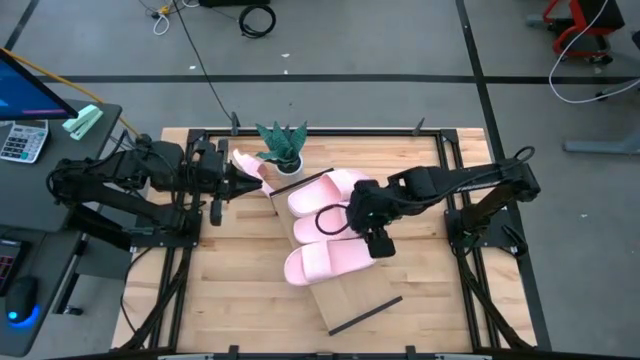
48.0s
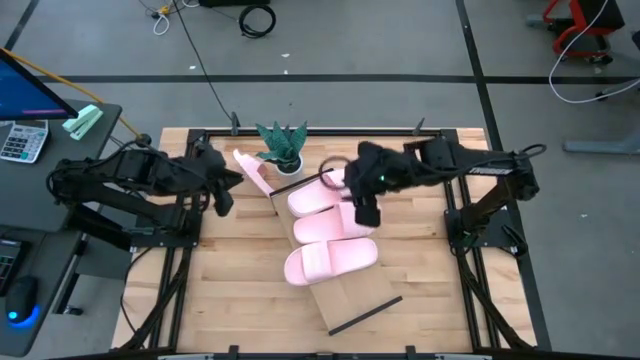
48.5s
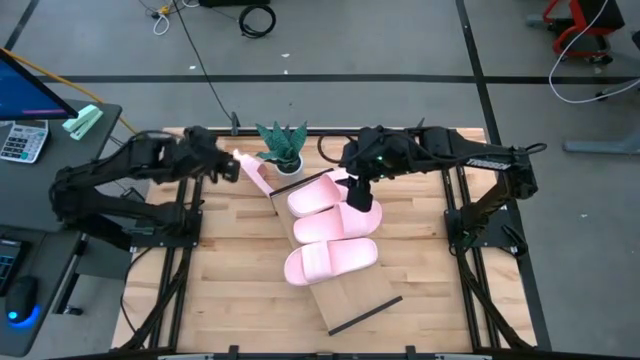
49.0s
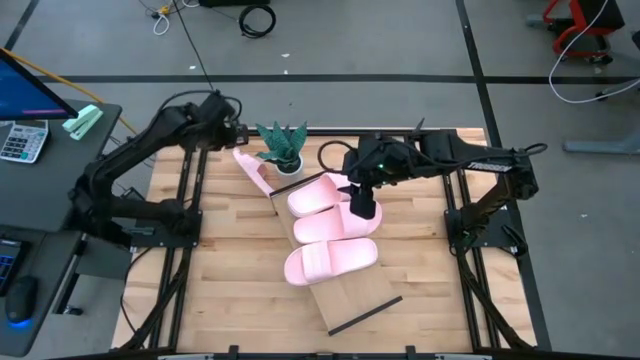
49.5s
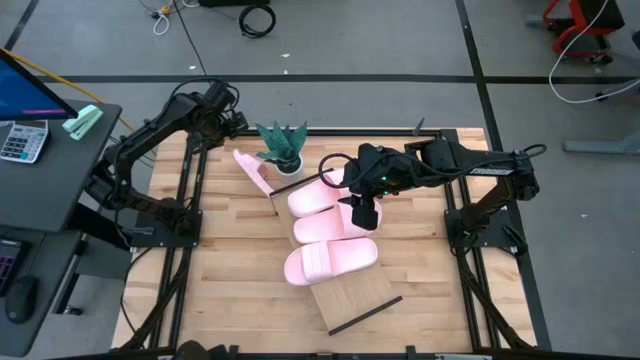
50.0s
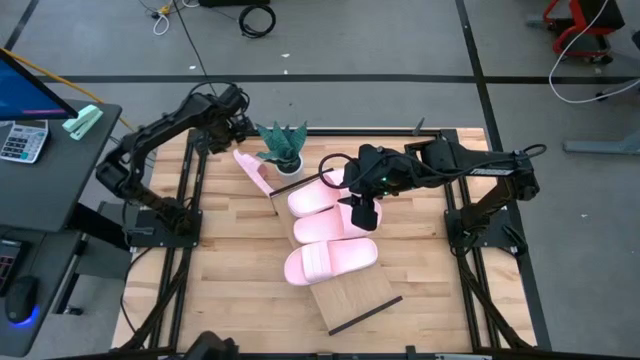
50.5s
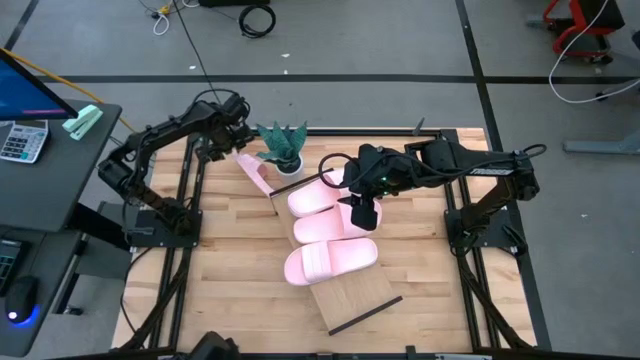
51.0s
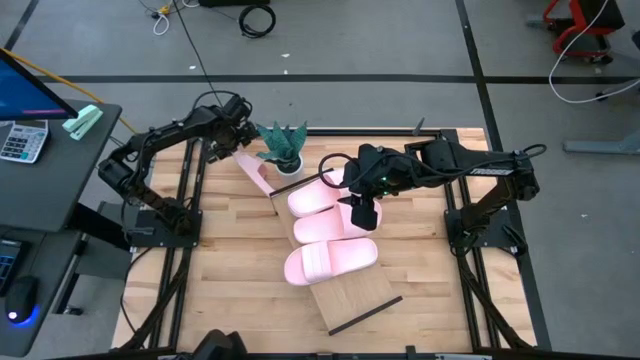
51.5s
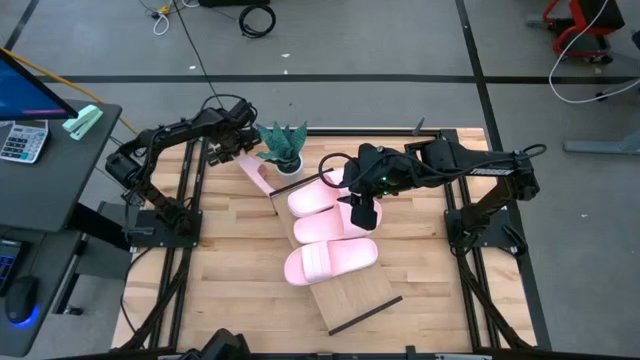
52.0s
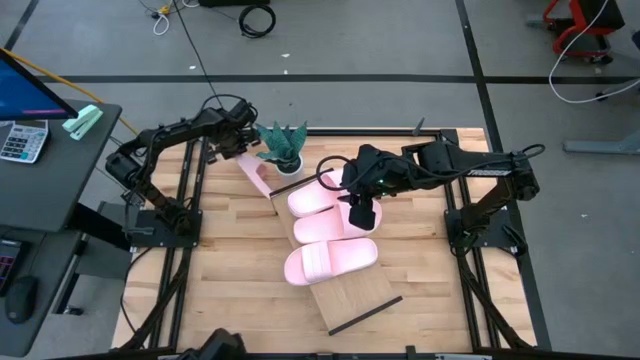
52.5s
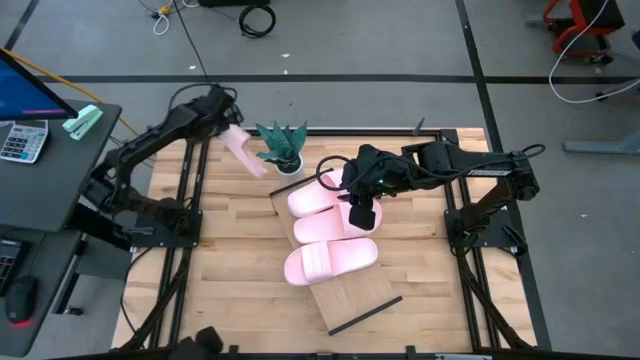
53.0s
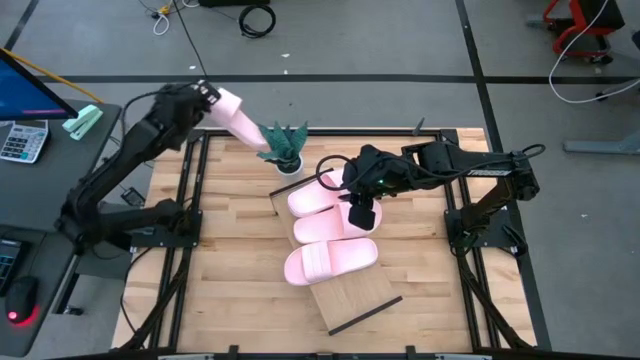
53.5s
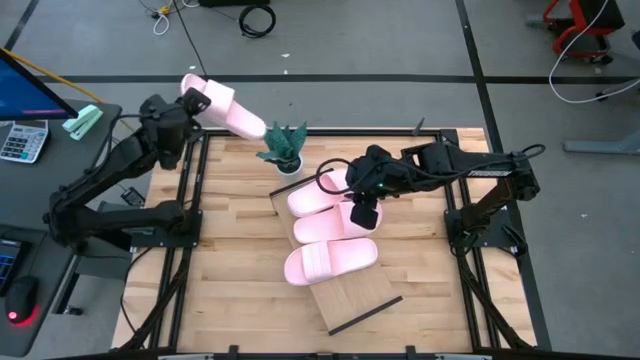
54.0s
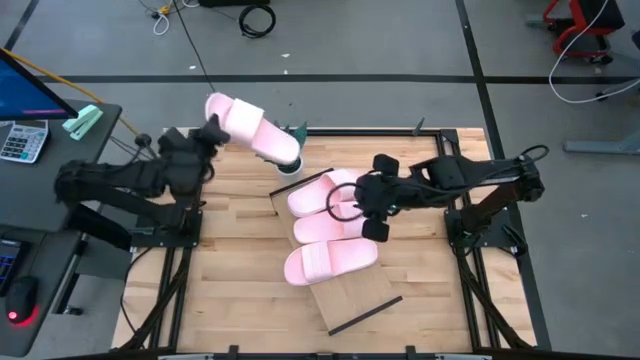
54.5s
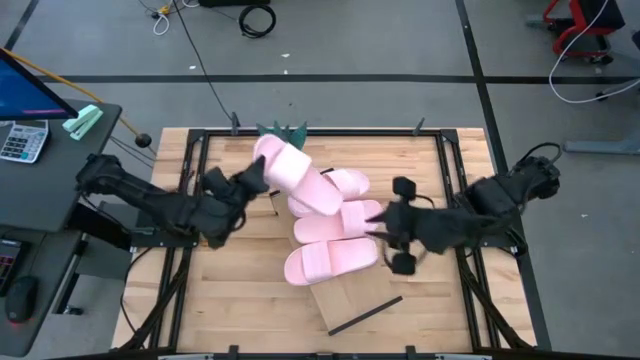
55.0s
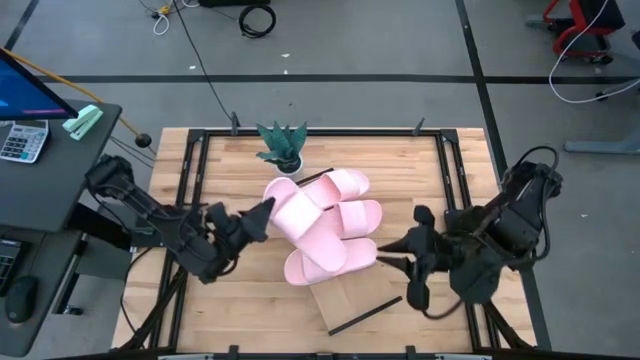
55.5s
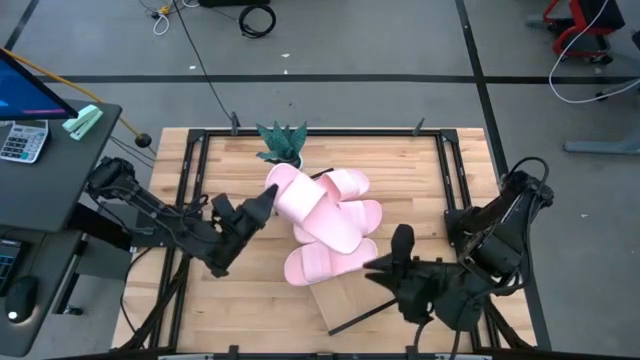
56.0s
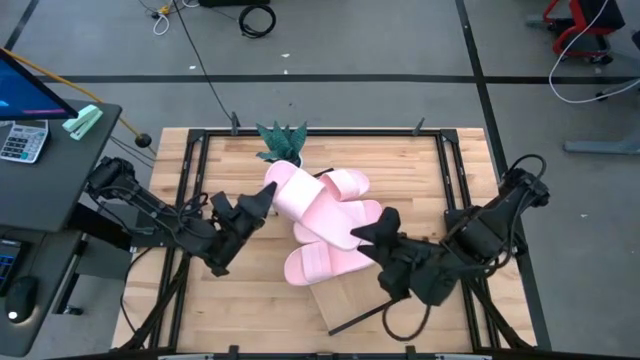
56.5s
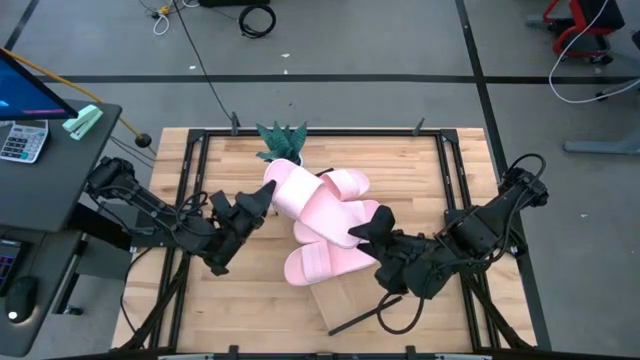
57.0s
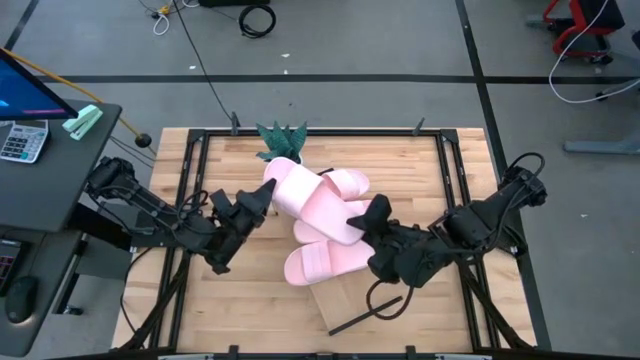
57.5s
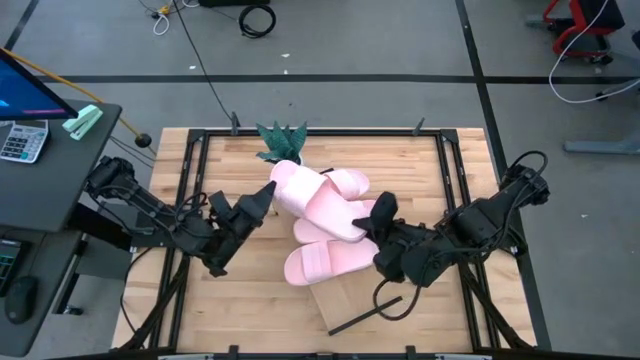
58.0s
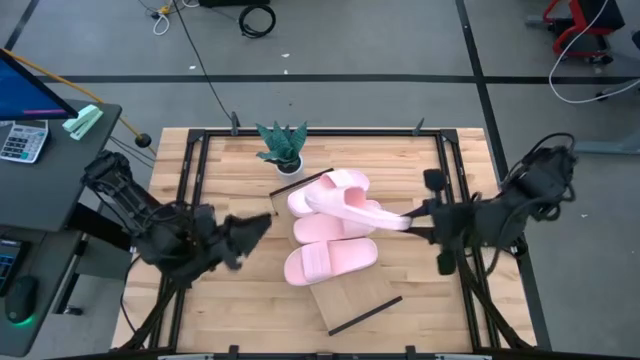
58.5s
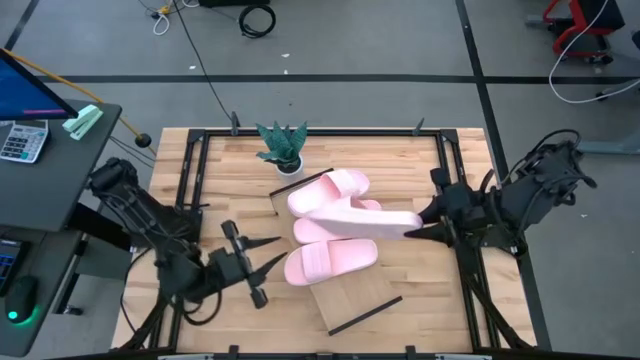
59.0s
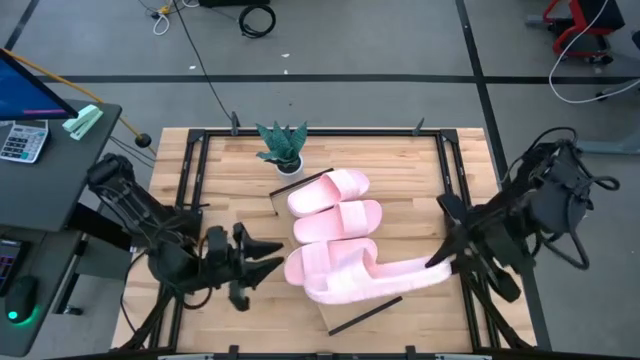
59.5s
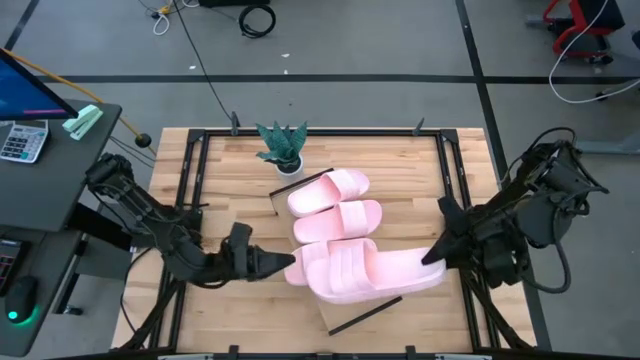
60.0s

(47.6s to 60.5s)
Task: Pick and place slides into the shelf
Put the pink slipper on the shelf

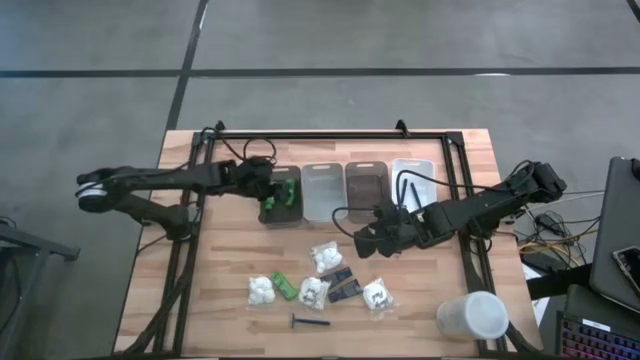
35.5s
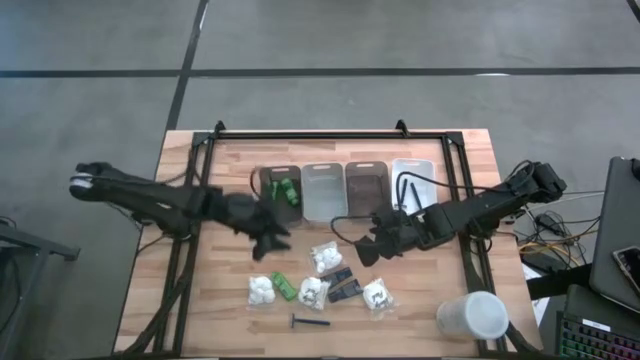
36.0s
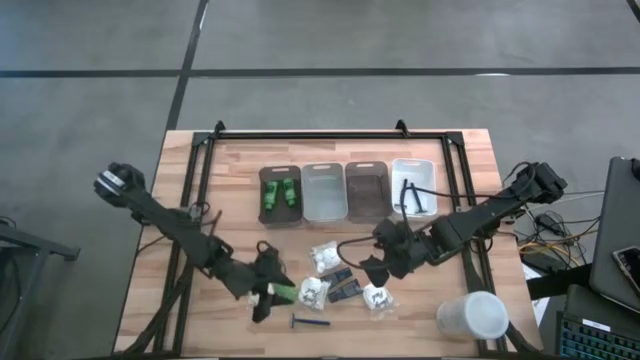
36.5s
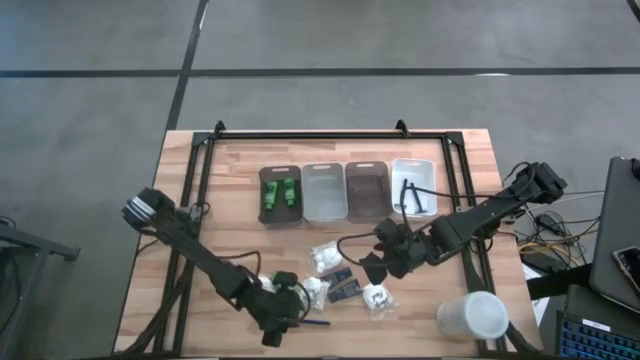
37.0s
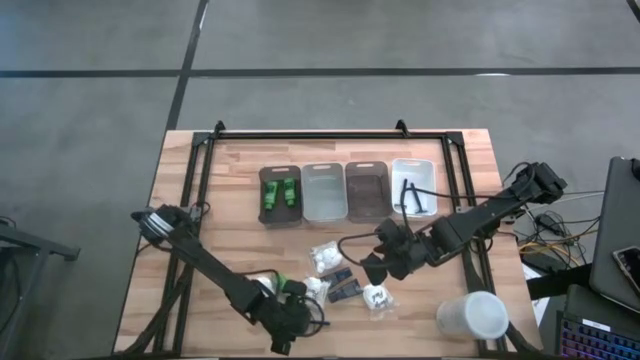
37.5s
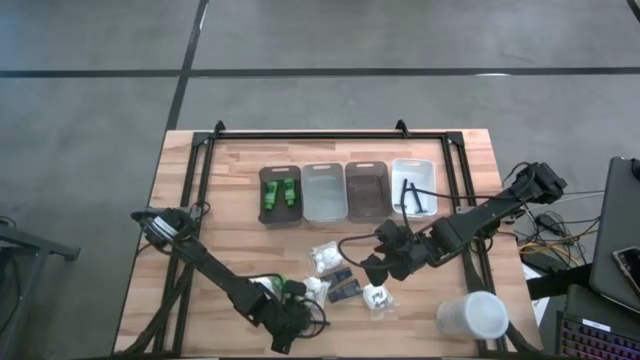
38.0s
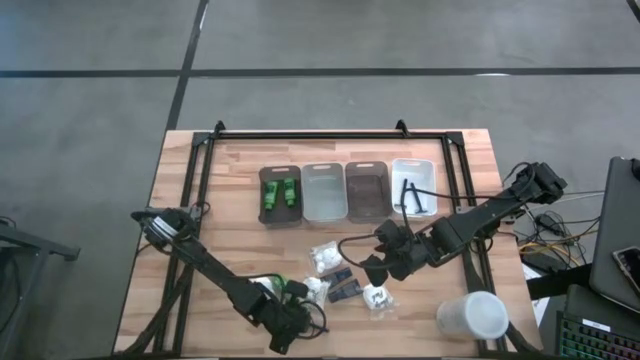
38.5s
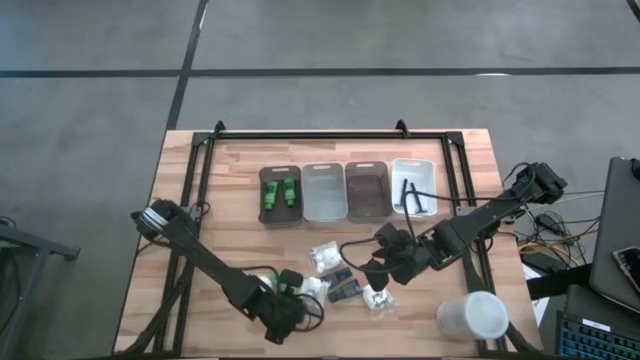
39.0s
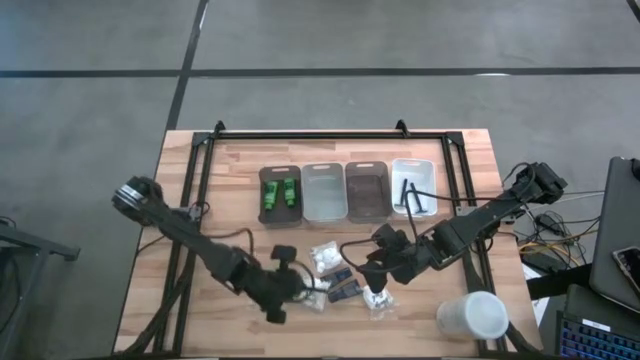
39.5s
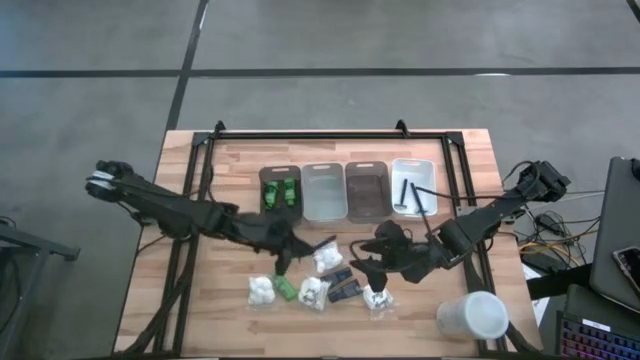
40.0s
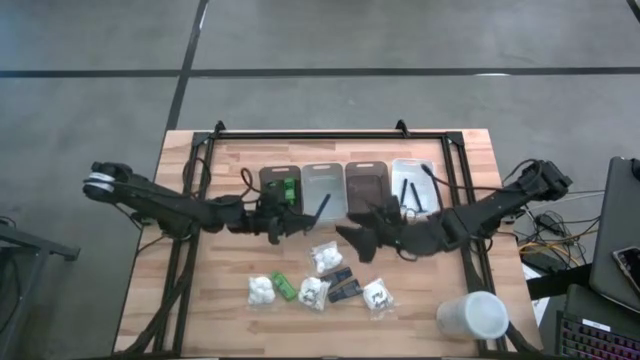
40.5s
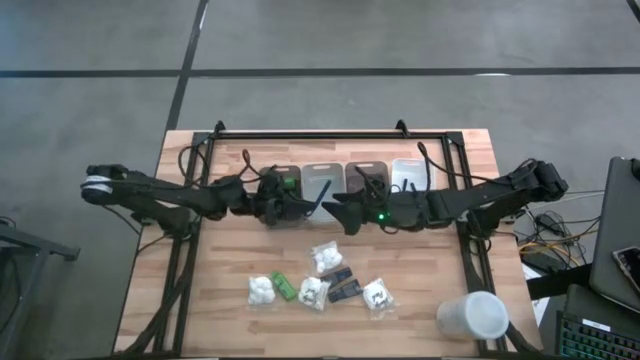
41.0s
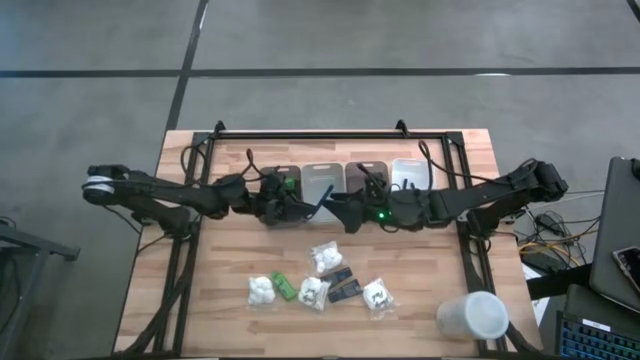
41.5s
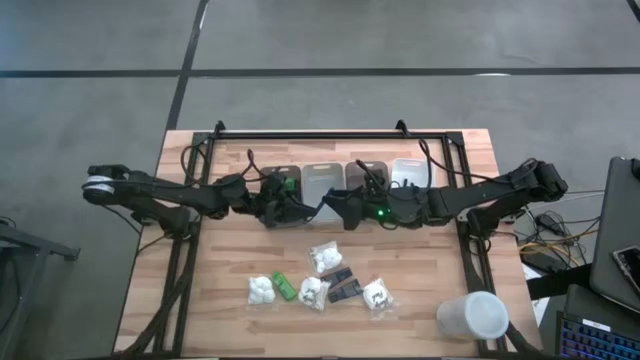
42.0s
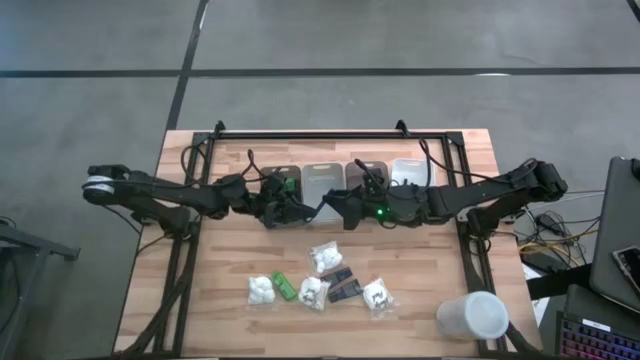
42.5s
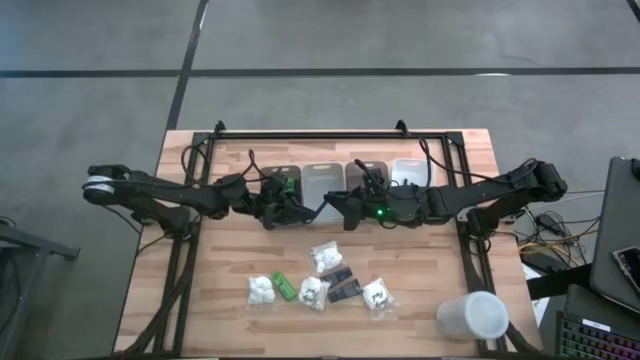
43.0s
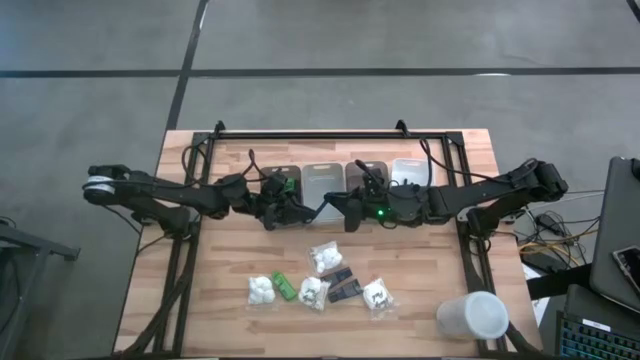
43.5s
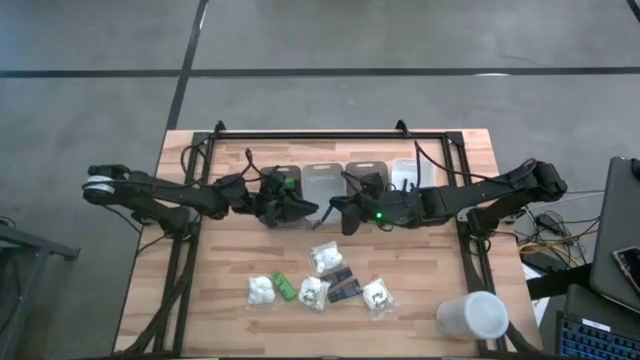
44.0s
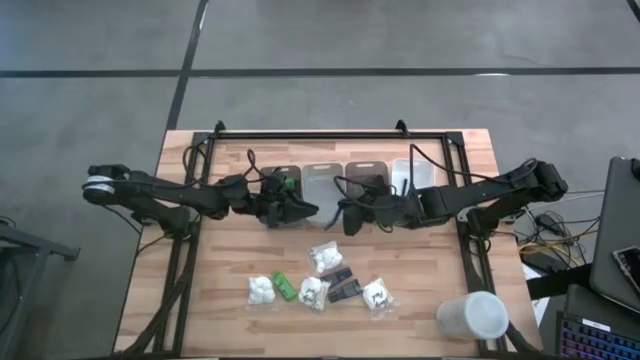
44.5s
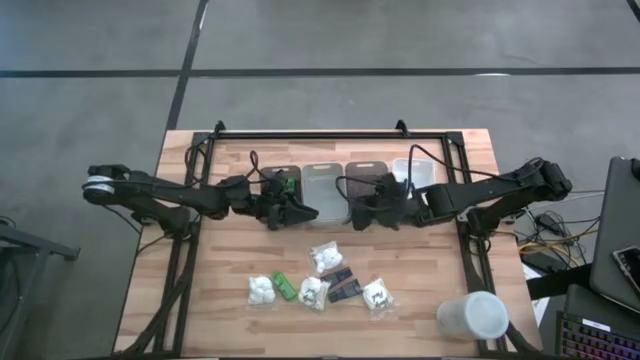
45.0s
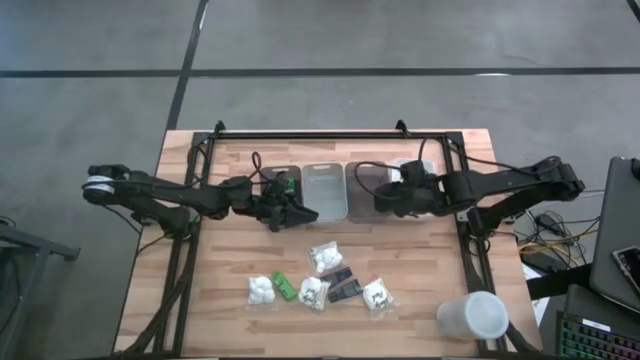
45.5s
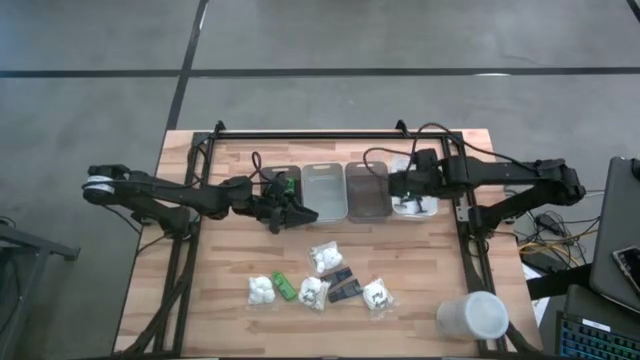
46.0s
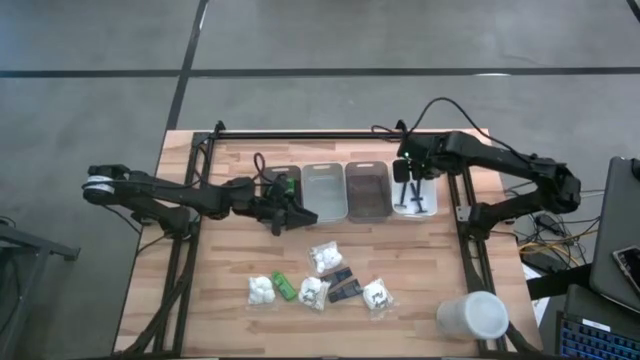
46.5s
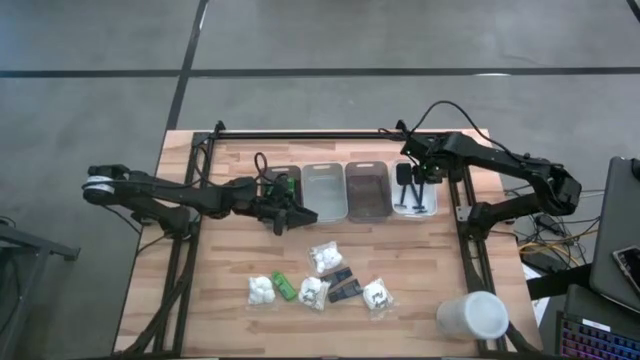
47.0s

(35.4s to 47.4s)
Task: Pick & Place Travel size toiletries
Put the razor into the white bin
